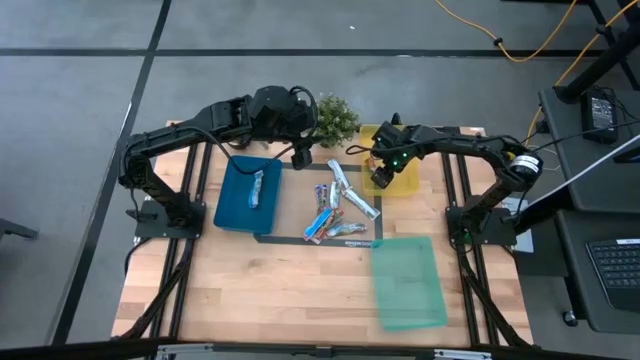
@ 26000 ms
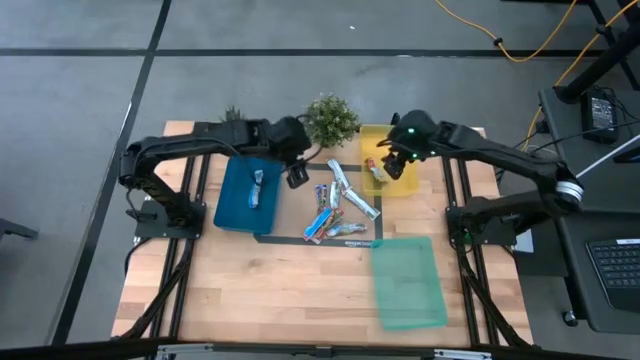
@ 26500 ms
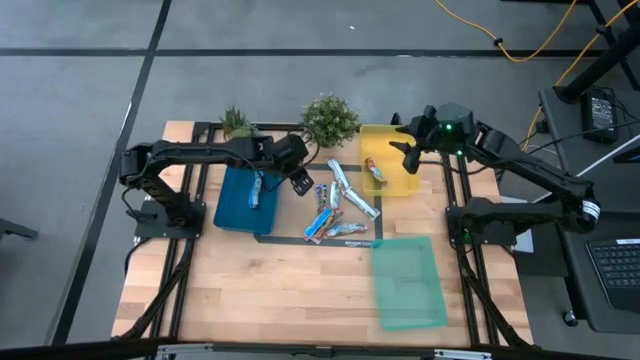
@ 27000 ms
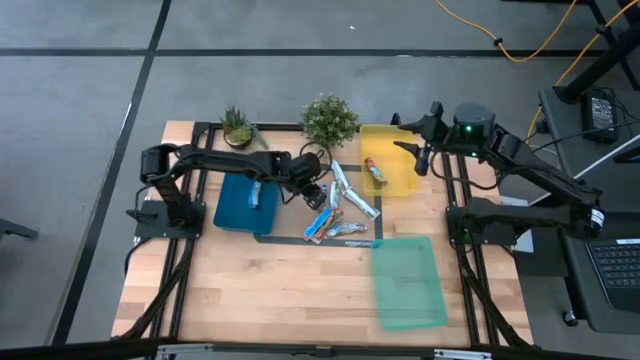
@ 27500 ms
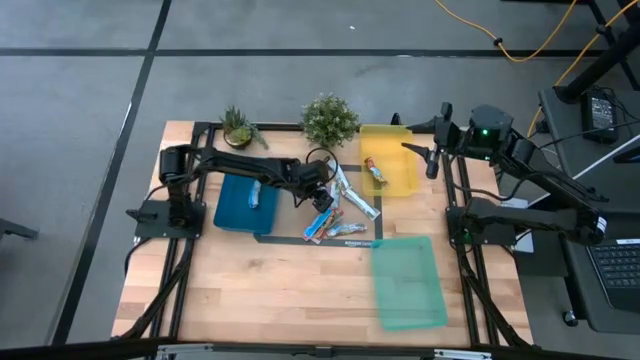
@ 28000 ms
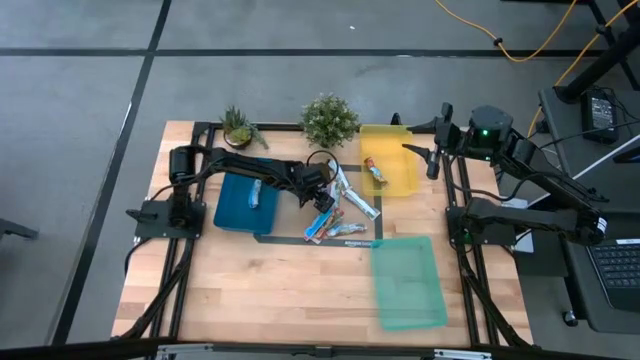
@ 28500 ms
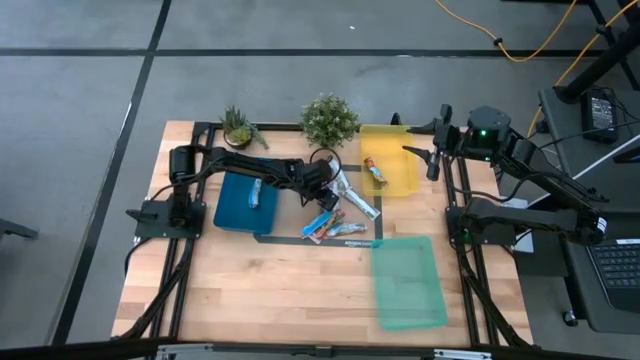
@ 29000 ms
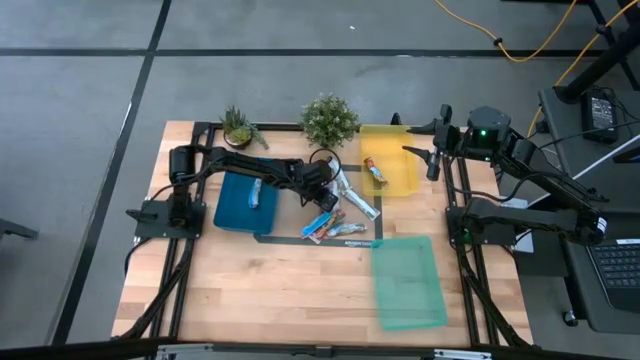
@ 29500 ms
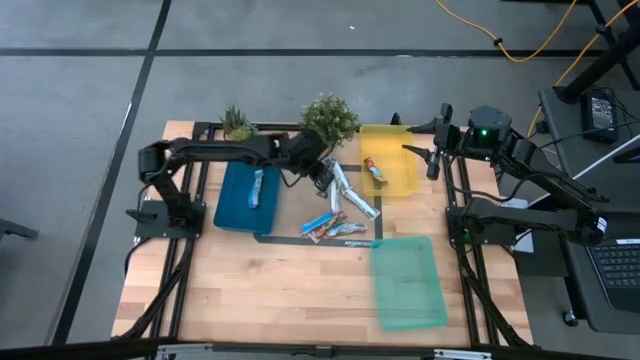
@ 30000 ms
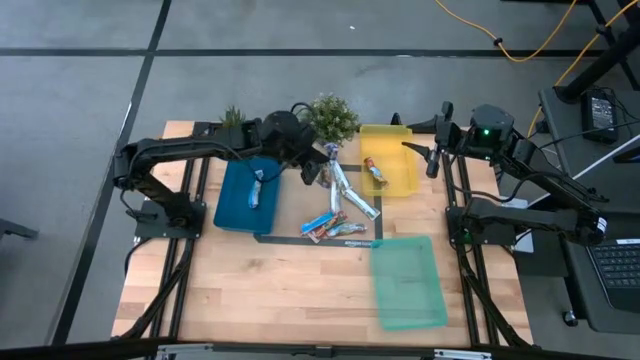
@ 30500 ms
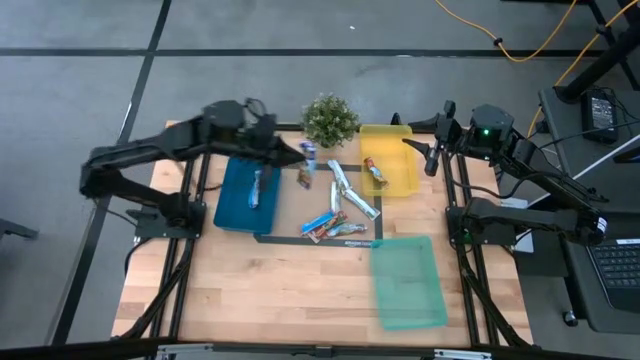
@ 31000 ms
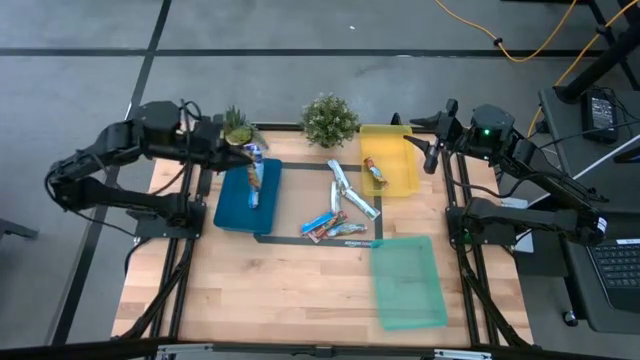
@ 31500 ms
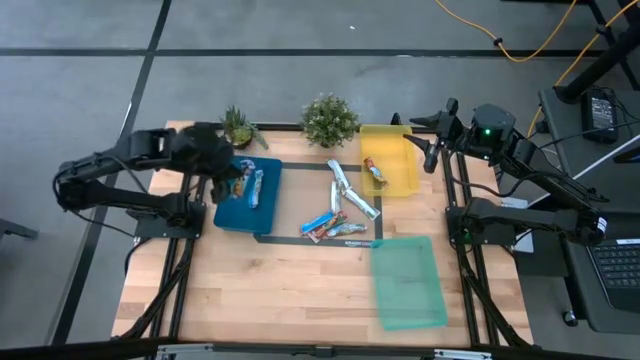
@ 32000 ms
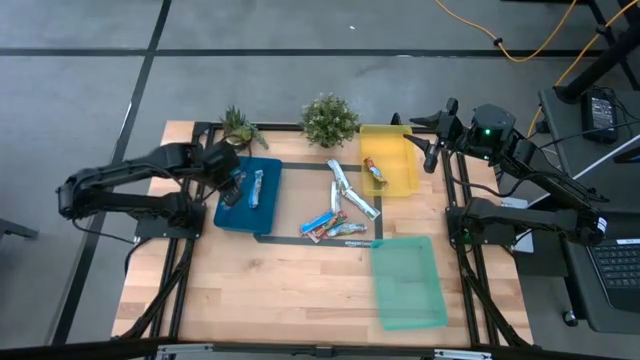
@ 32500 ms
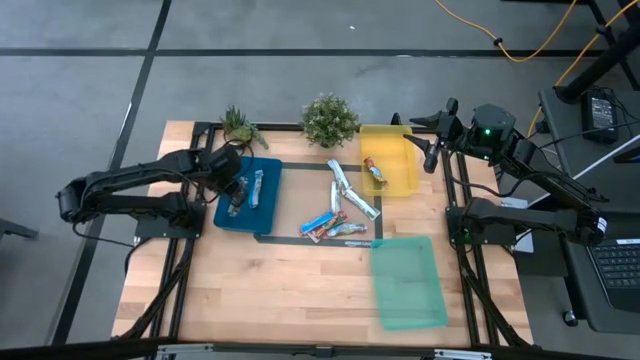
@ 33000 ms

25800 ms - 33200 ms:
Task: Pick and place Granola Bars by type
Put the blue granola bar into the blue bin

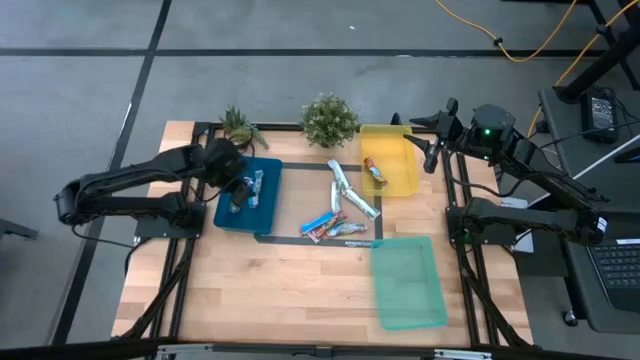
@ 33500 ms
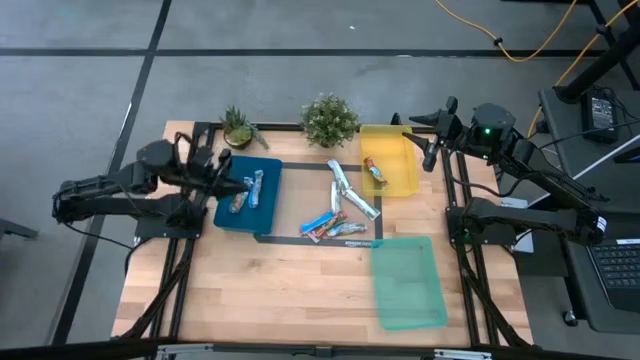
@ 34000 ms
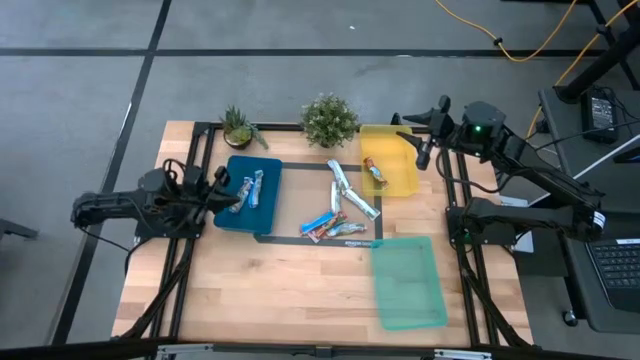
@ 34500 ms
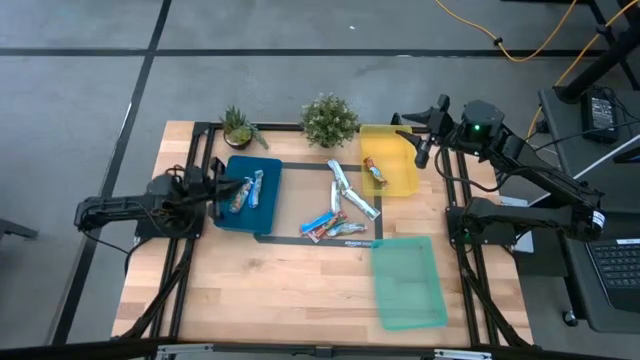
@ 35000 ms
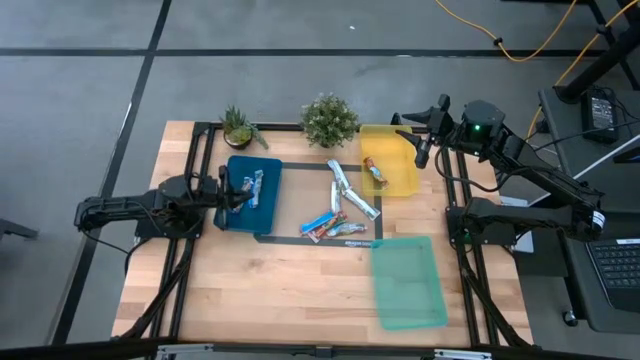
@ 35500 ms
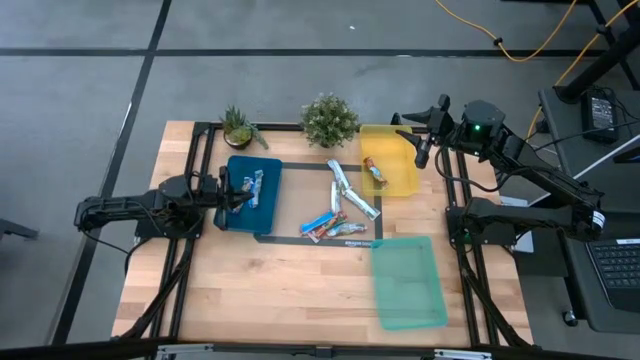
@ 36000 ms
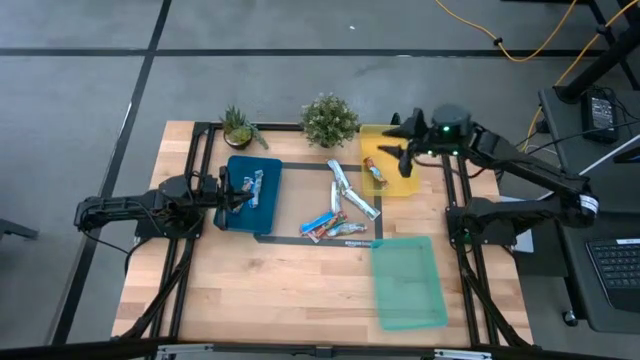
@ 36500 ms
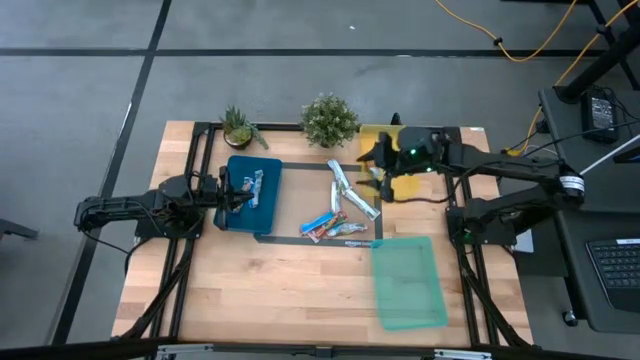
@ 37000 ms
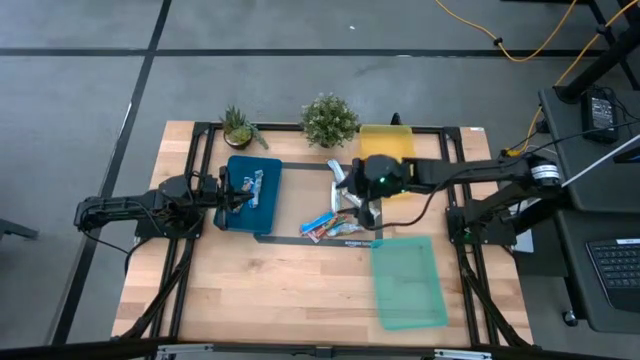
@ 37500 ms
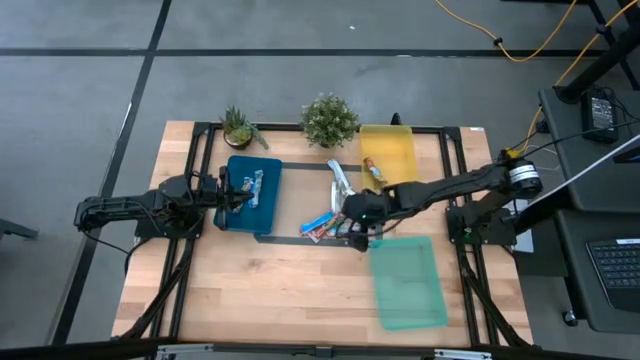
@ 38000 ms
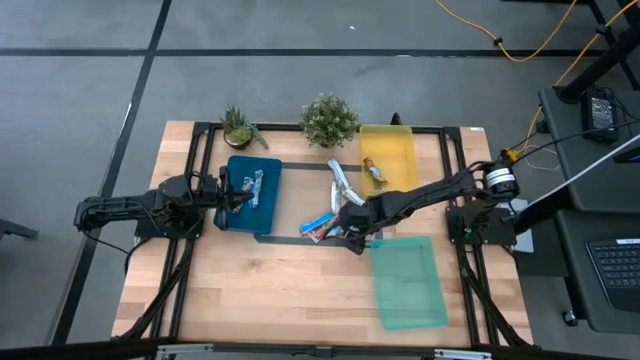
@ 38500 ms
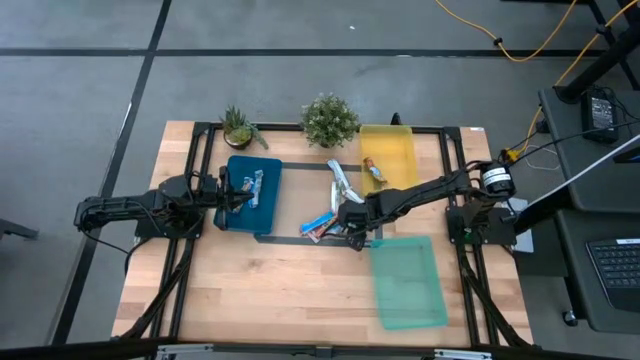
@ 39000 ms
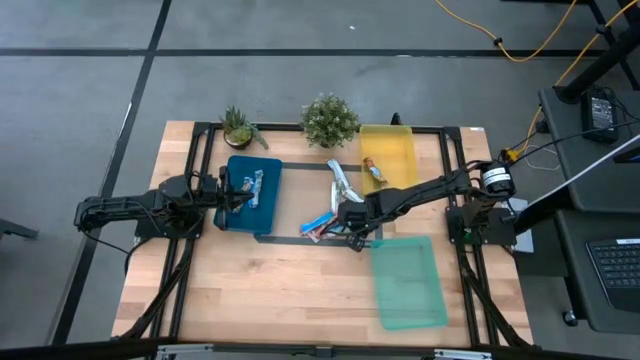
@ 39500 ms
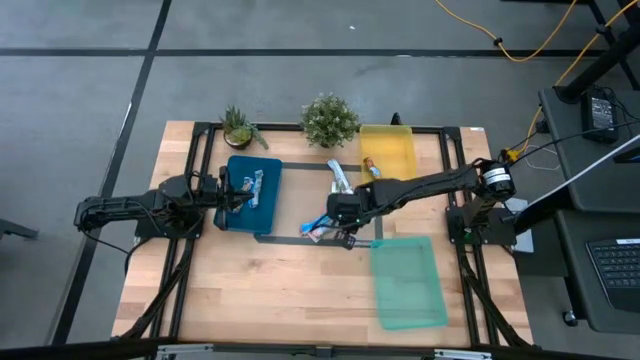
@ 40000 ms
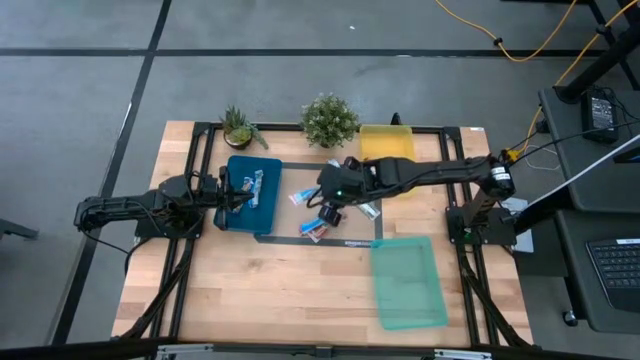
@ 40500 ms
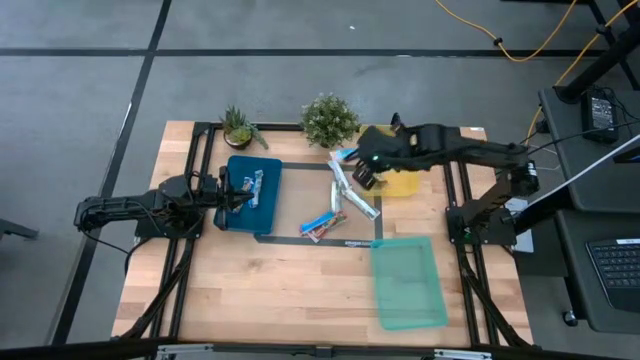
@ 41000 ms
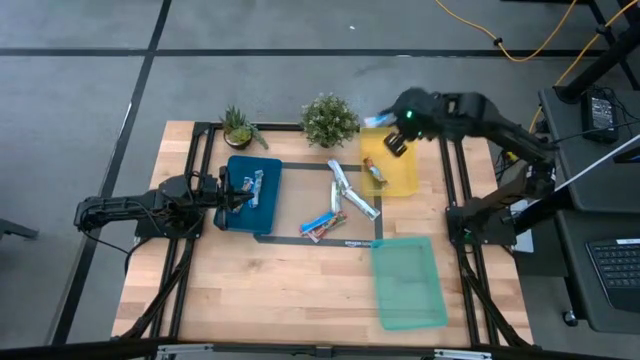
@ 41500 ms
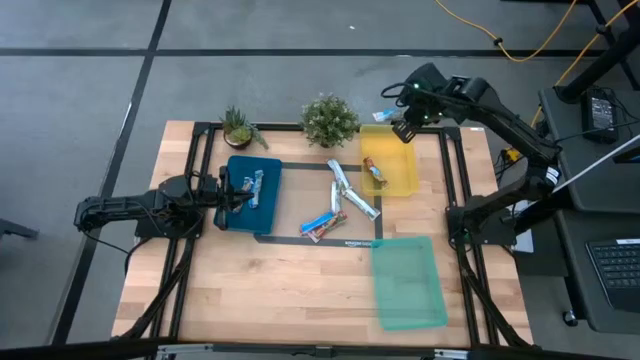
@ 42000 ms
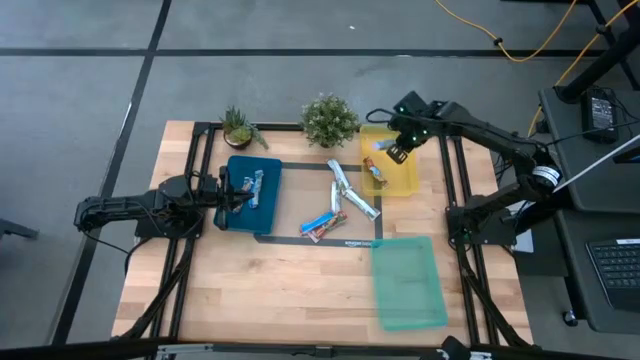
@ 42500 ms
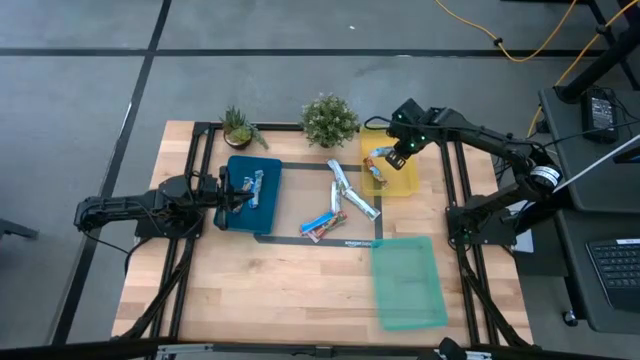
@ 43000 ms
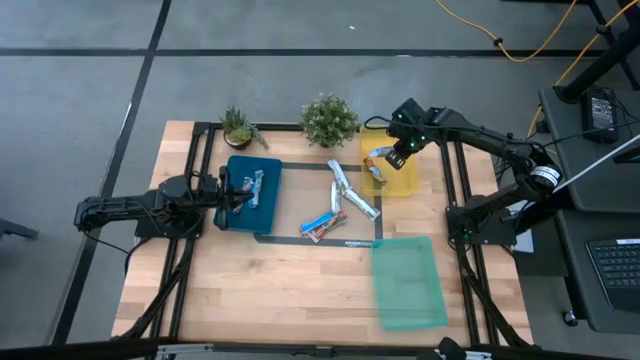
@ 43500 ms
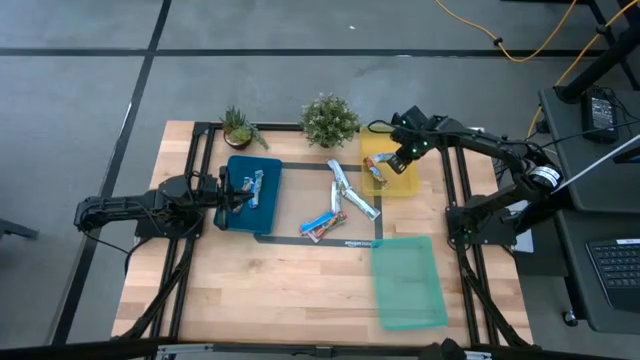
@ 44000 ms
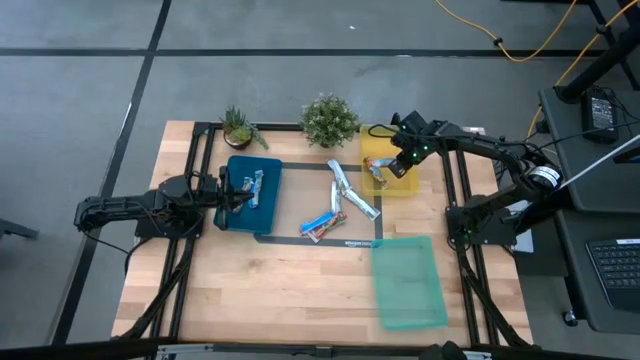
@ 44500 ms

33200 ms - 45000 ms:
Put the red granola bar into the yellow bin

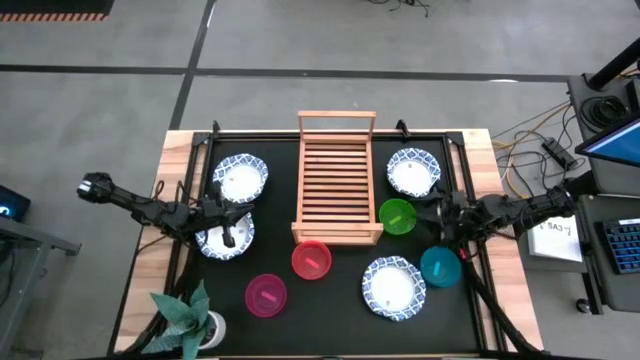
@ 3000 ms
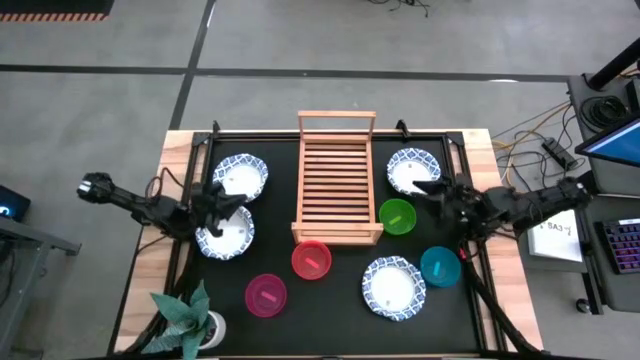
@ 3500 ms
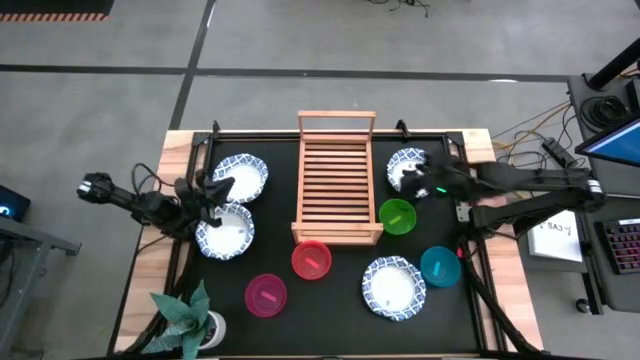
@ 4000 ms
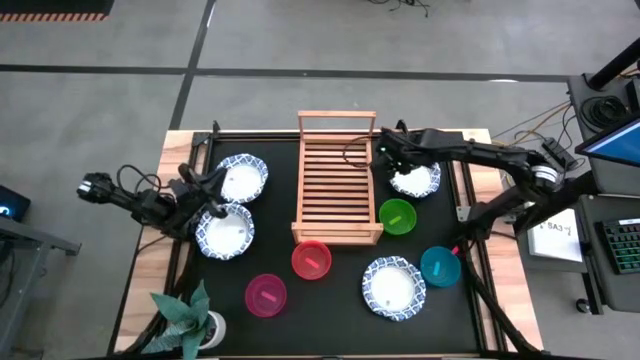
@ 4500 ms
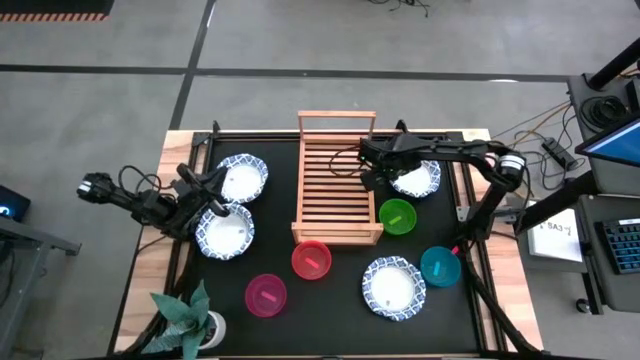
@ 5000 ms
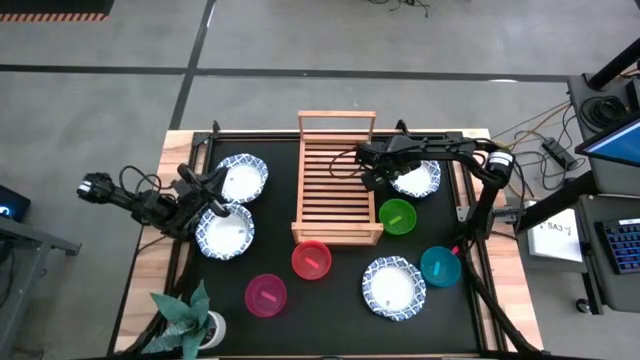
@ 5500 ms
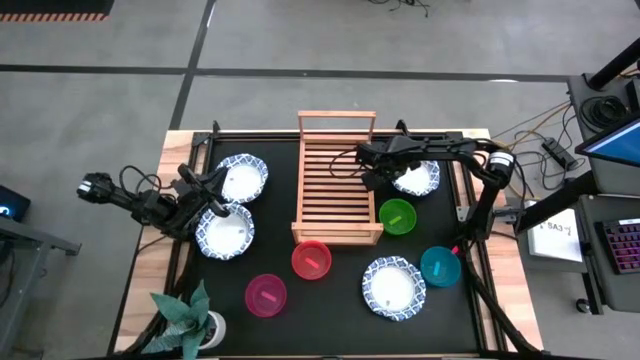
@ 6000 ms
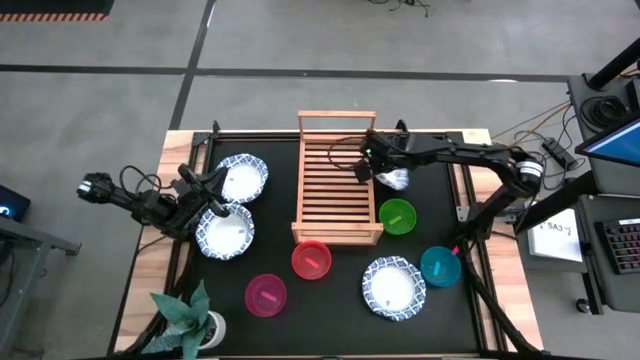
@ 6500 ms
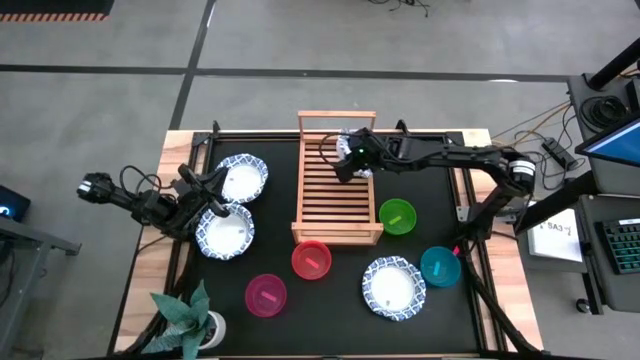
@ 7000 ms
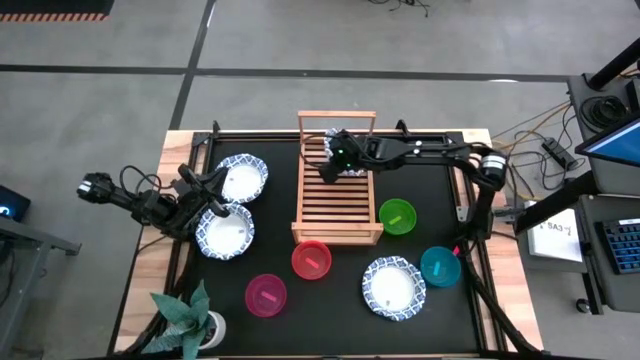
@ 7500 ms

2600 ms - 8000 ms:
Task: Place and stack bowls onto a shelf
Put the top right white bowl on the shelf
